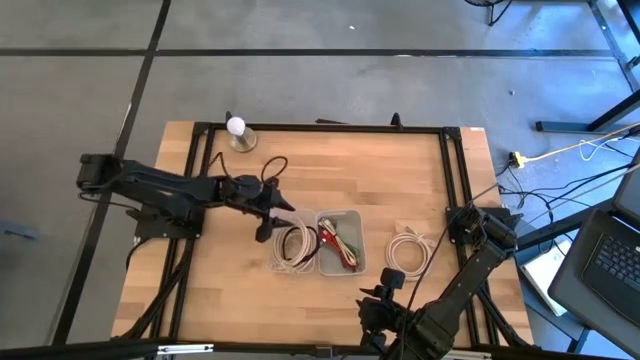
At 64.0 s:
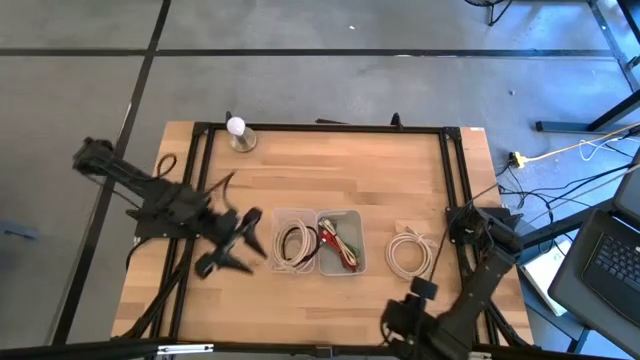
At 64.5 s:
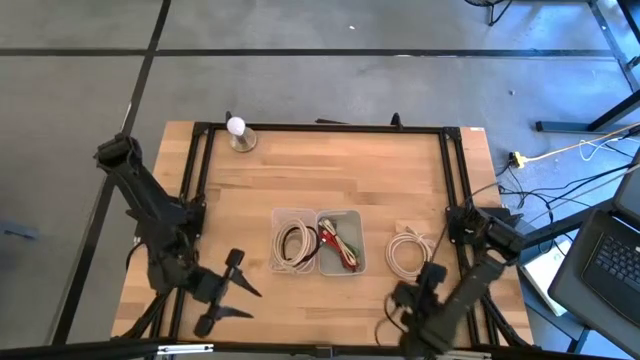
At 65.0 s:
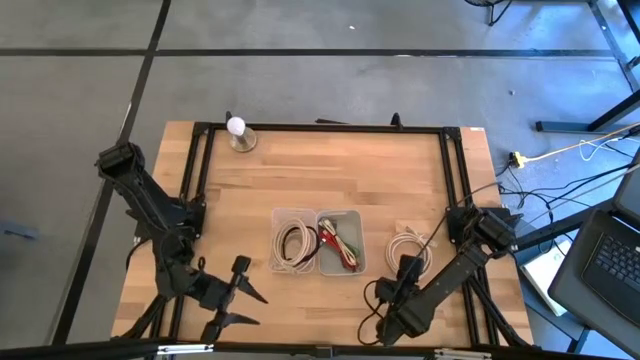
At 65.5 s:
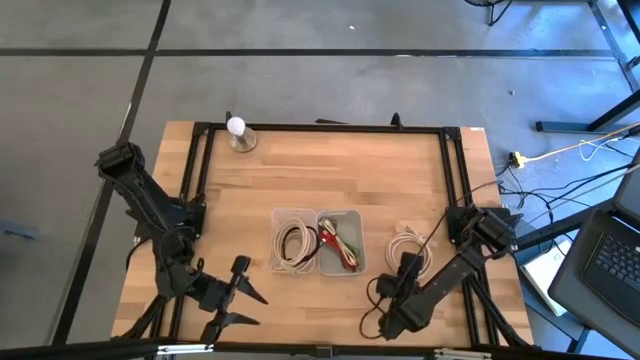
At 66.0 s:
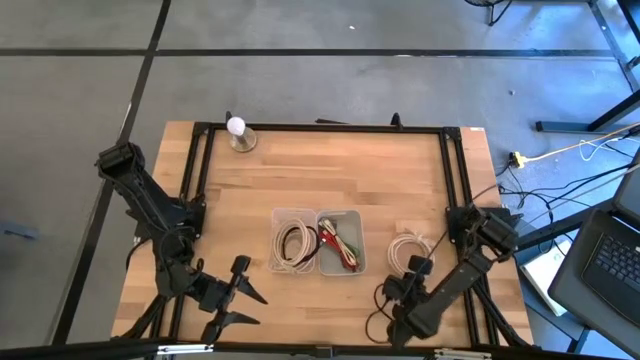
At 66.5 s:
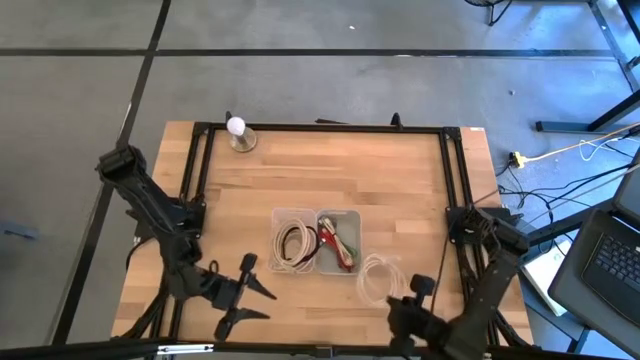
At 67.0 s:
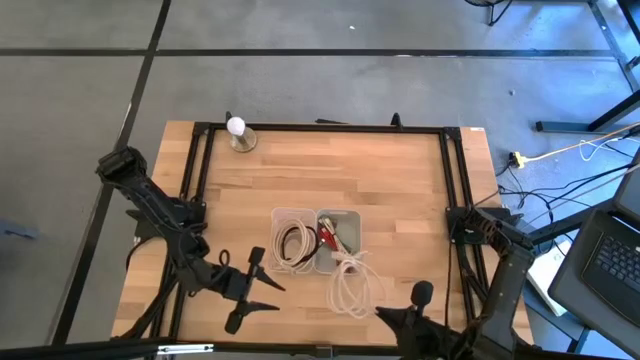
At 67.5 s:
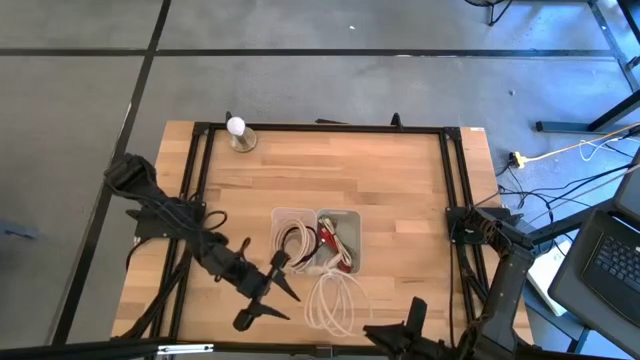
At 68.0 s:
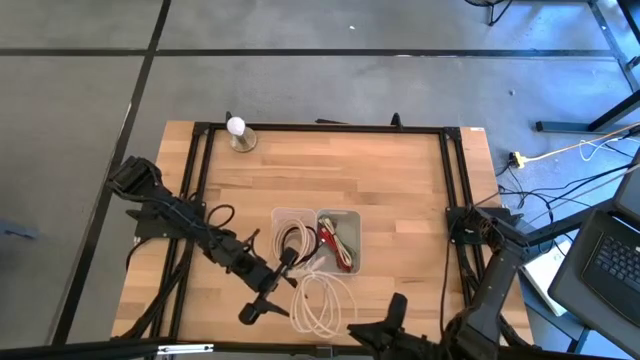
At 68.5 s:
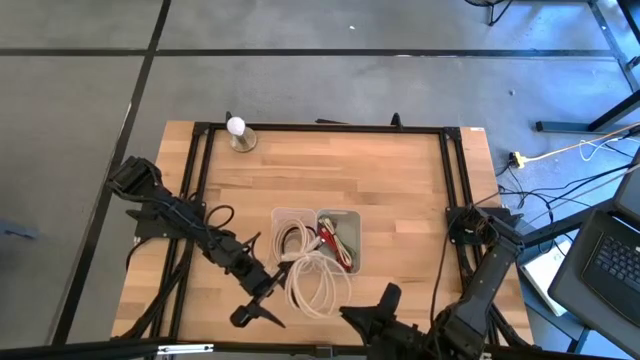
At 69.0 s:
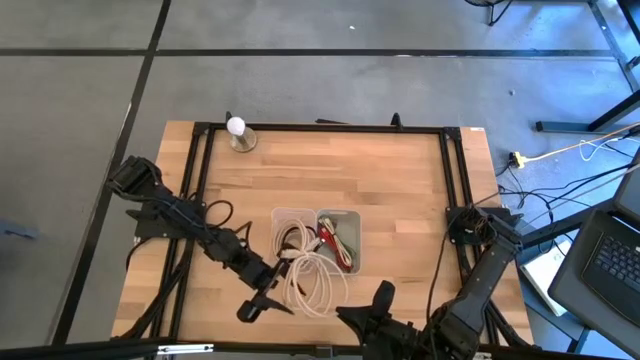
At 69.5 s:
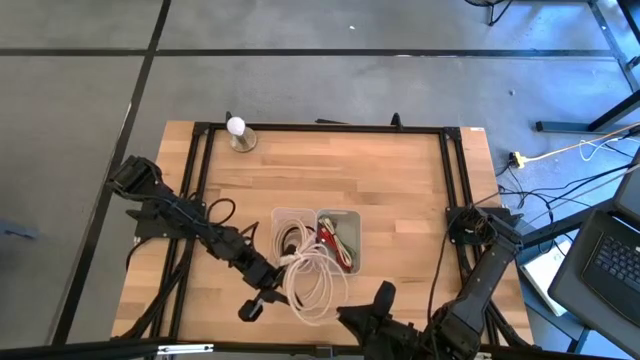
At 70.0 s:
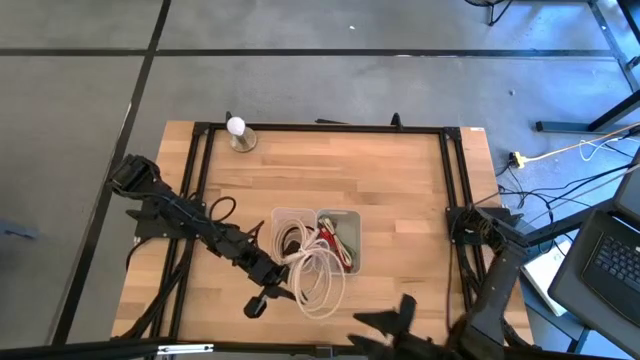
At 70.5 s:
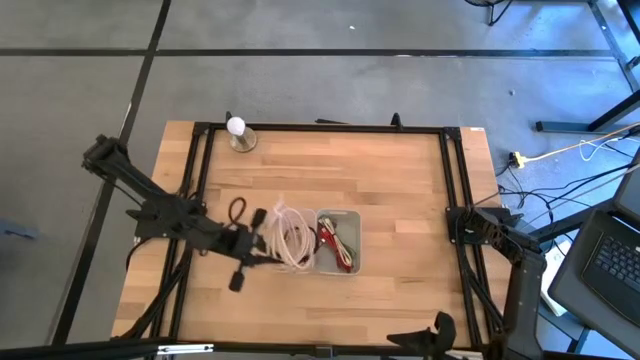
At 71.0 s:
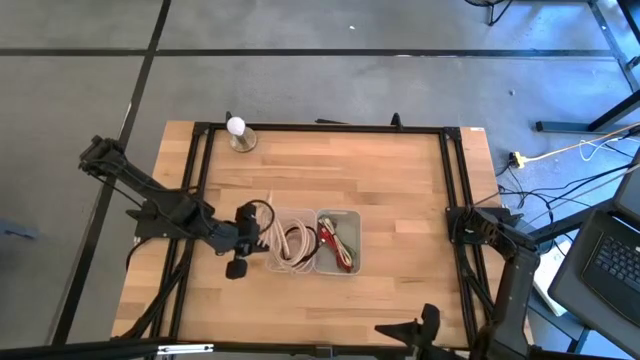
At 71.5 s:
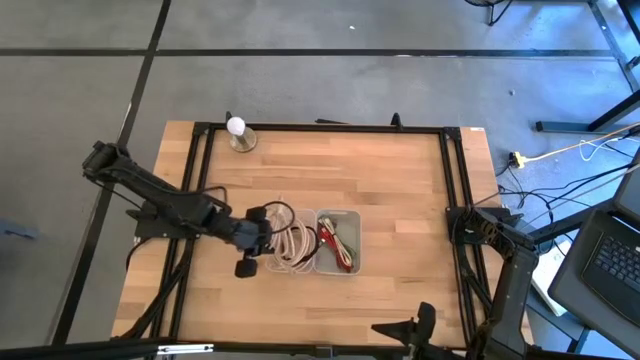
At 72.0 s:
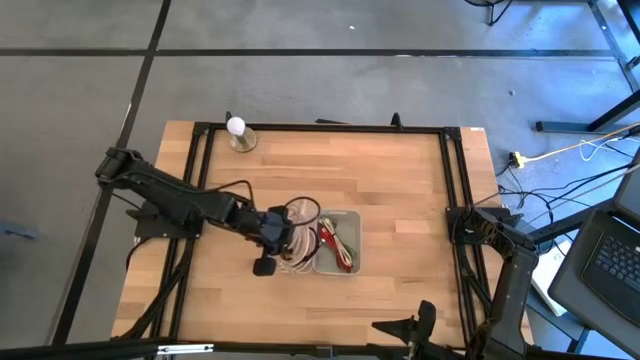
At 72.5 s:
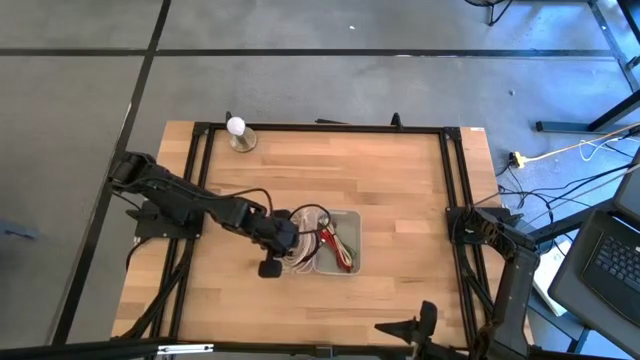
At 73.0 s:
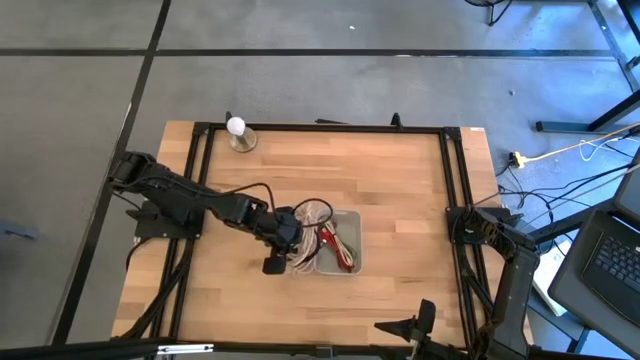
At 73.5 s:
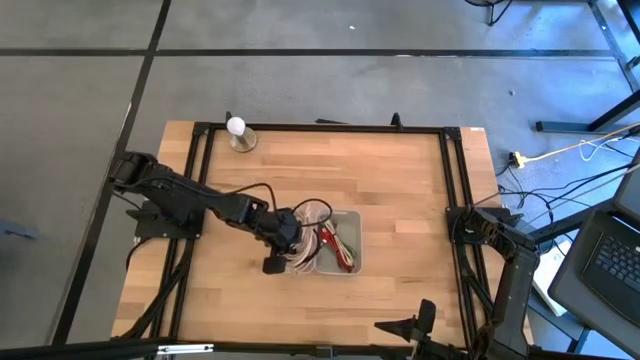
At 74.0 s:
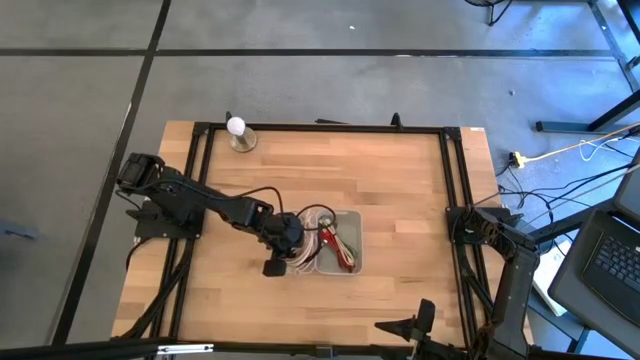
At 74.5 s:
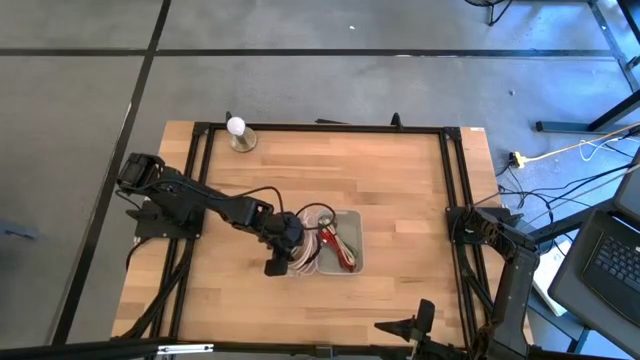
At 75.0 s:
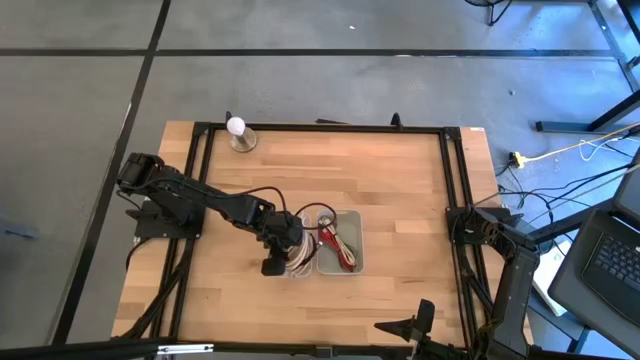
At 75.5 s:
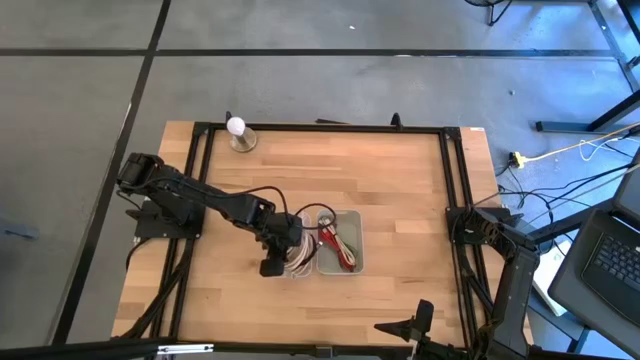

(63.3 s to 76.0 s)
Put the white HDMI cable into the transparent bin
